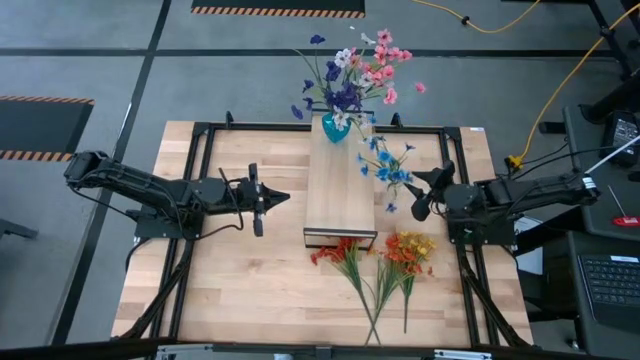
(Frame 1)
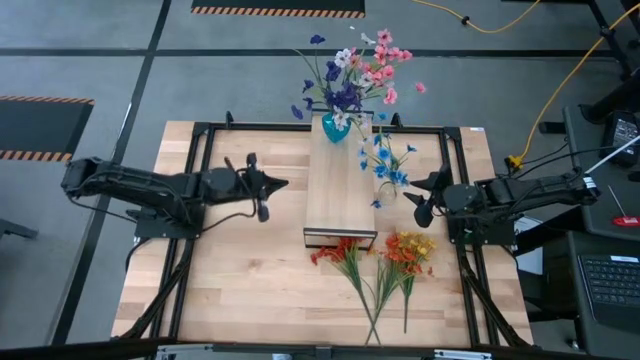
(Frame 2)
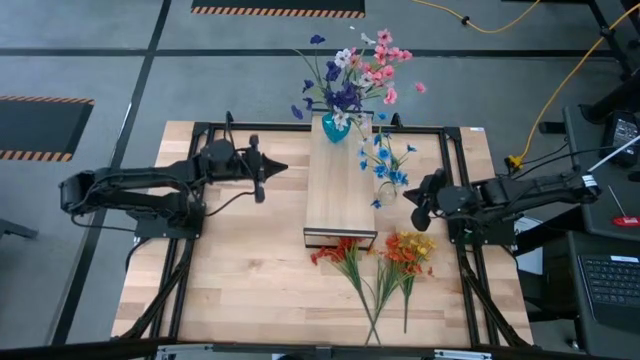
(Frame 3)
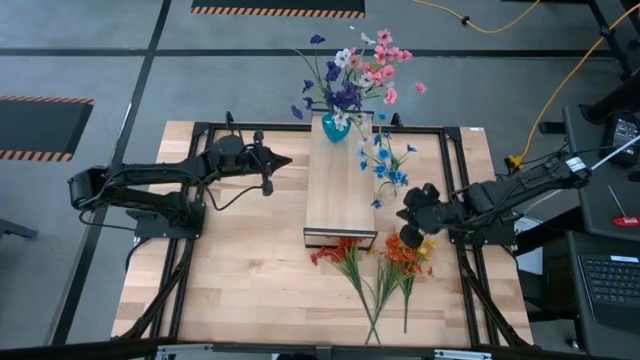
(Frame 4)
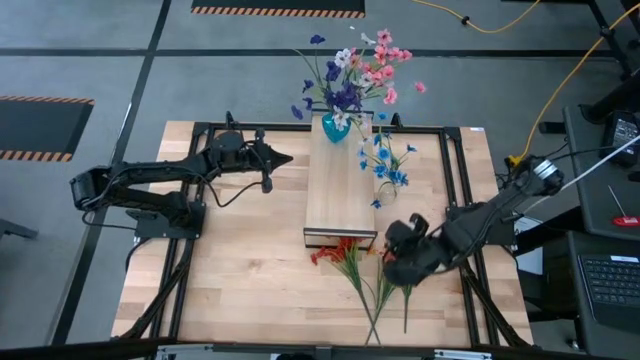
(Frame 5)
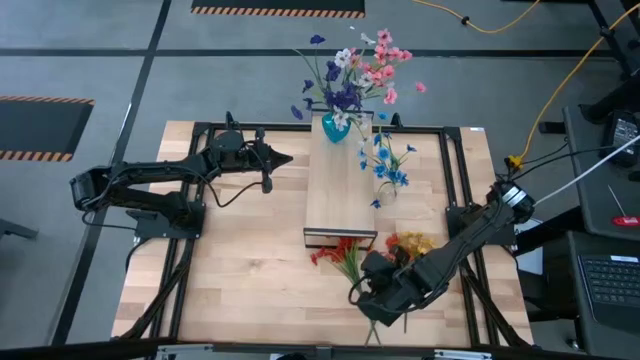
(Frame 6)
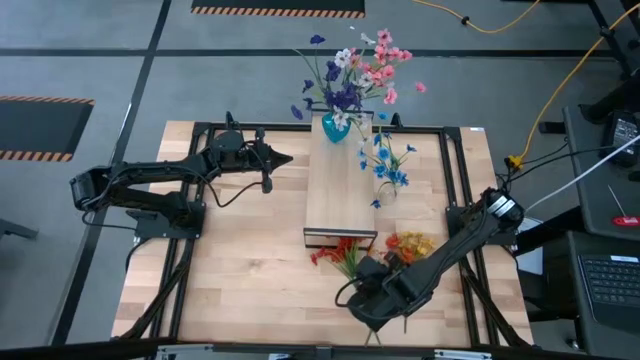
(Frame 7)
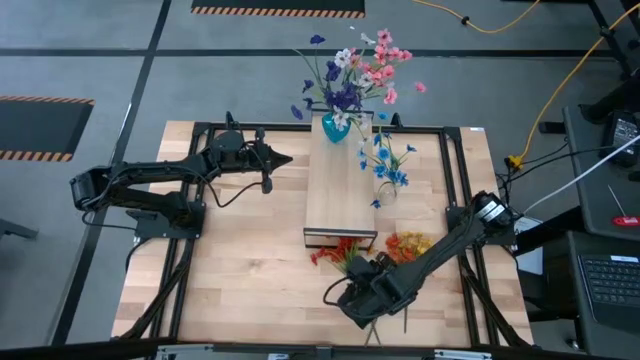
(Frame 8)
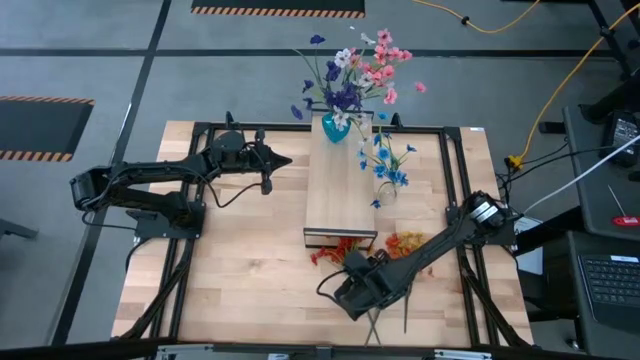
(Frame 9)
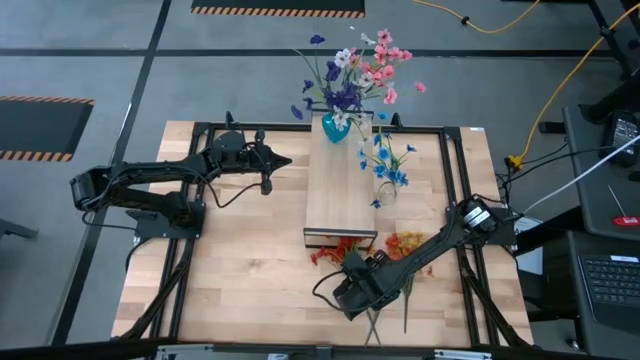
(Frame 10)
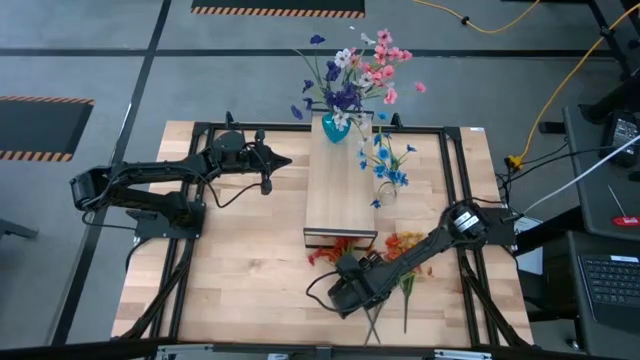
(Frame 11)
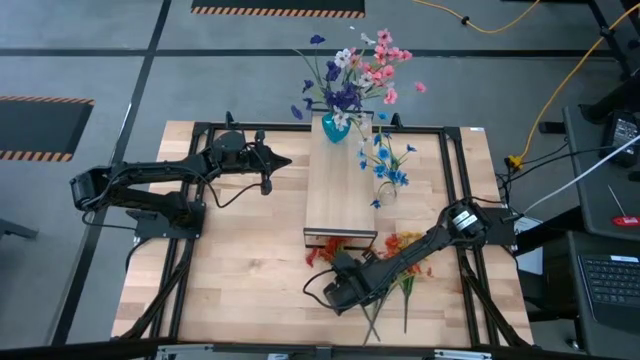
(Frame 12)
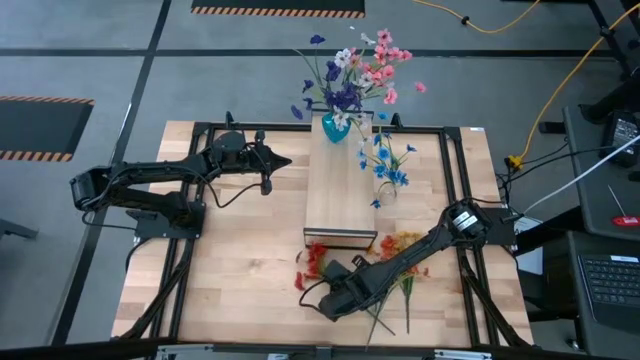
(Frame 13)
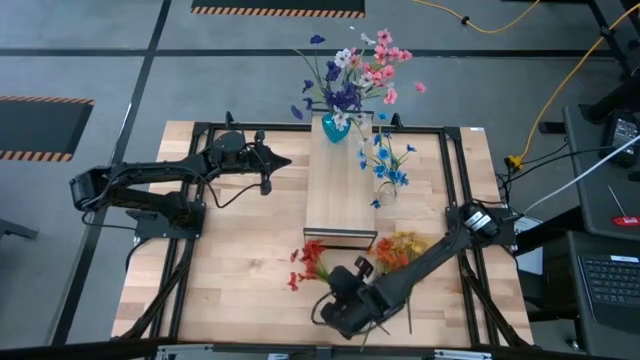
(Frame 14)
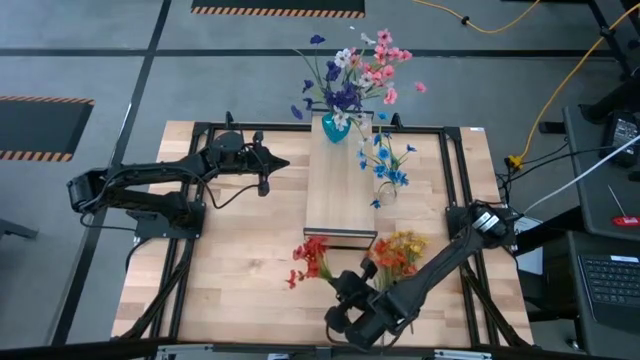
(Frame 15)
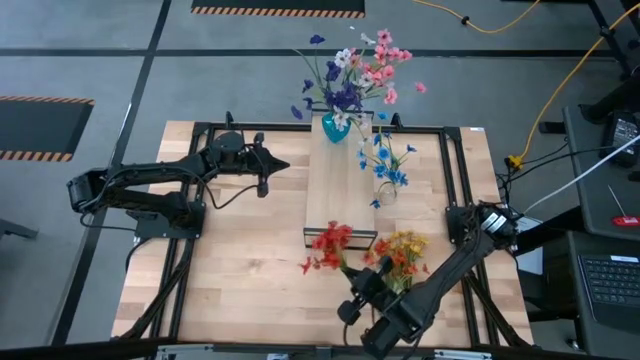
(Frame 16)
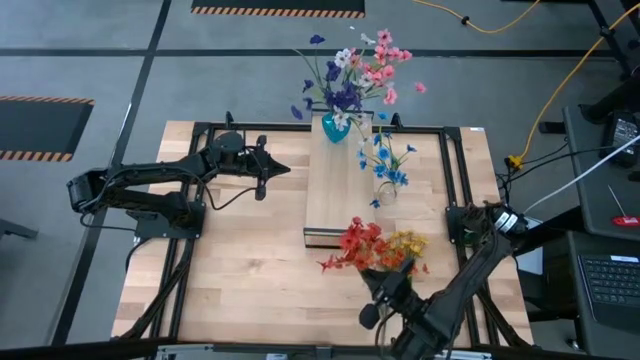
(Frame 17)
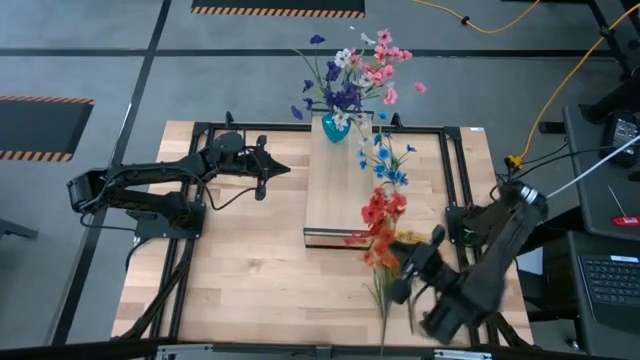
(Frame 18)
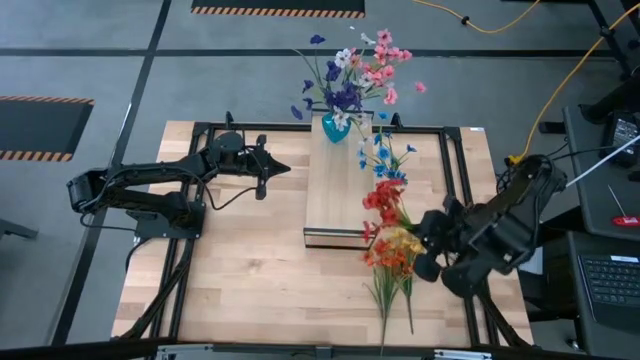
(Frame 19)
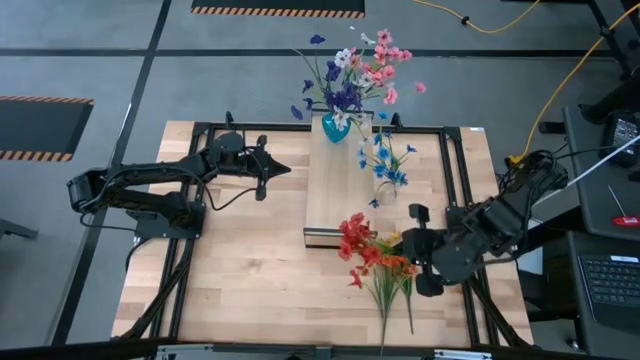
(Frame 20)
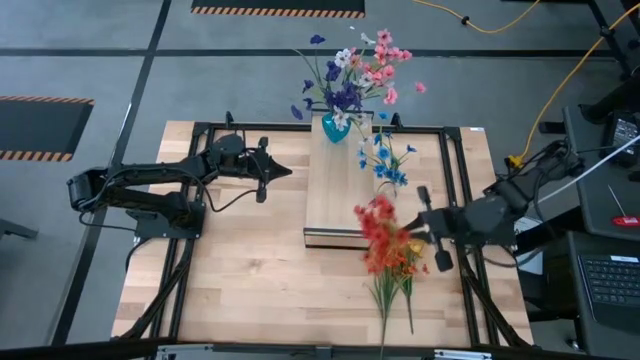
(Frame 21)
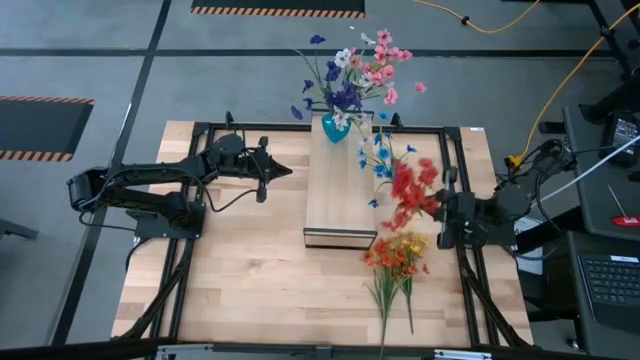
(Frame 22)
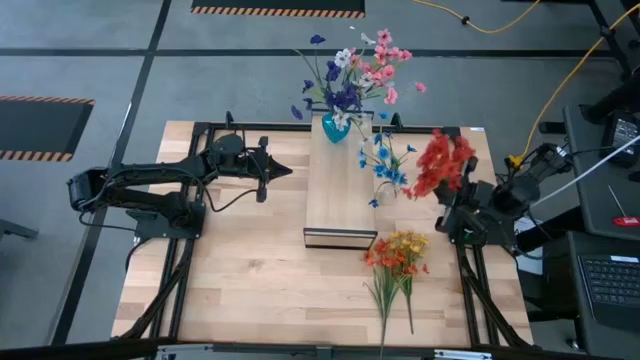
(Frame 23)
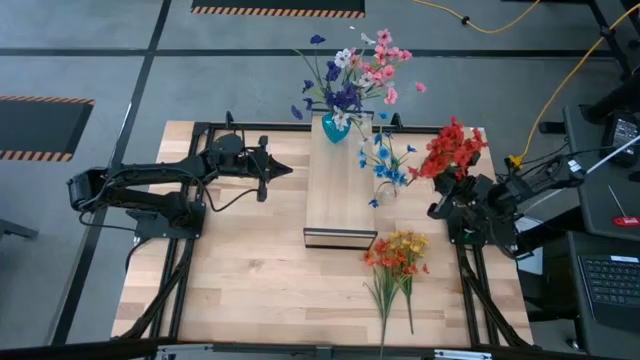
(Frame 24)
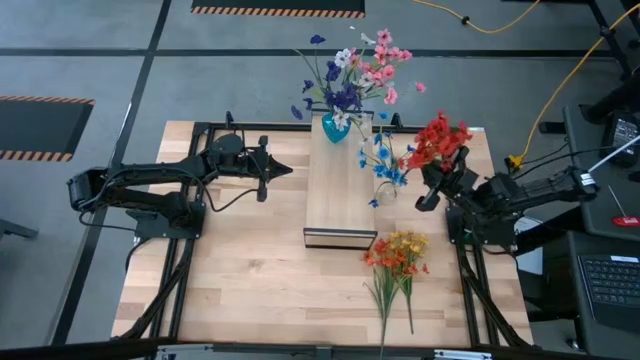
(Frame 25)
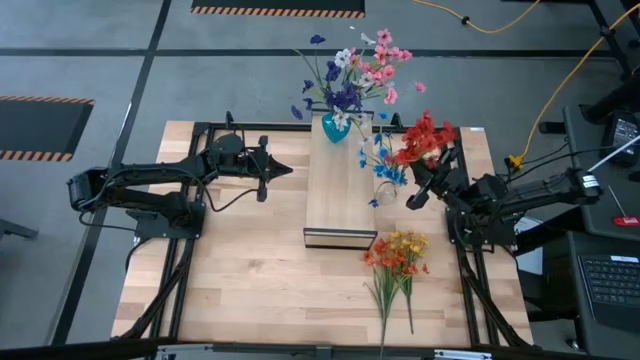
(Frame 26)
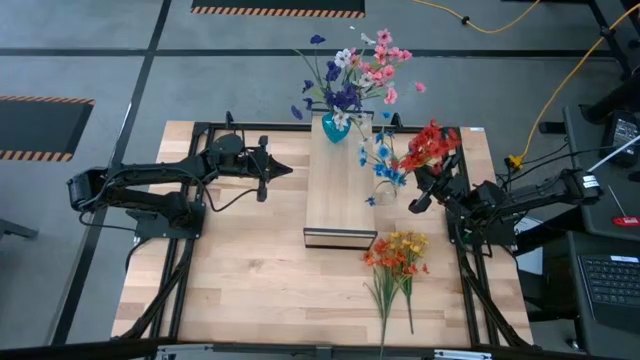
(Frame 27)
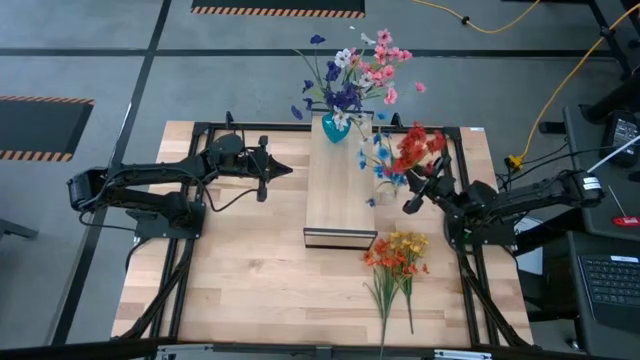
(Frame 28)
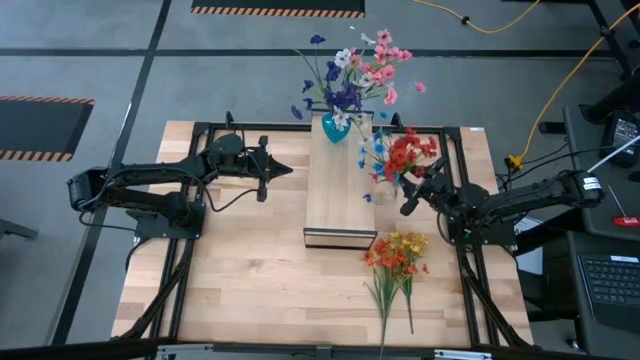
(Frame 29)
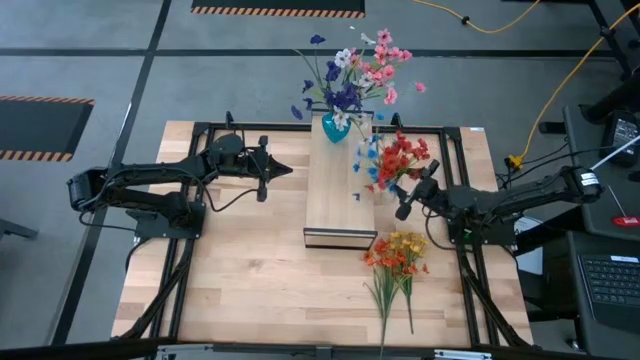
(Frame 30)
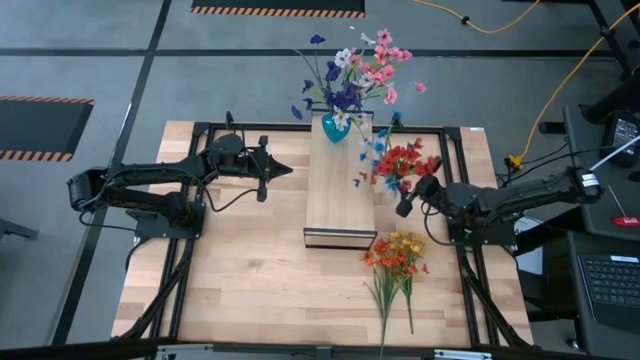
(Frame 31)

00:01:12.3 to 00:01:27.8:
Task: Pick and place flowers into a vace then onto a shelf
Put the red flowers into the transparent vase

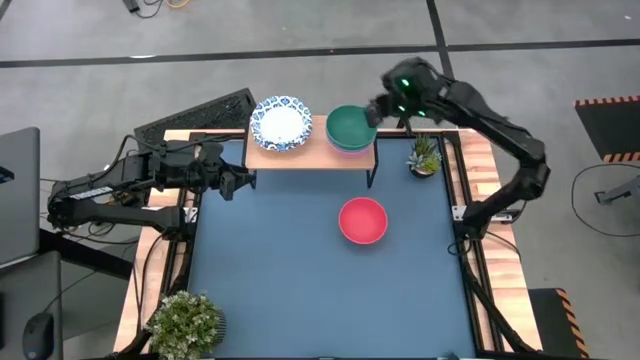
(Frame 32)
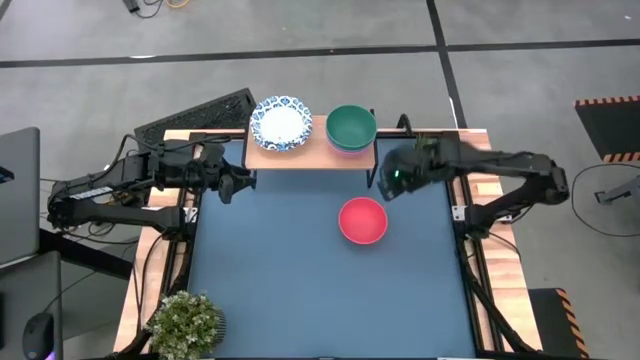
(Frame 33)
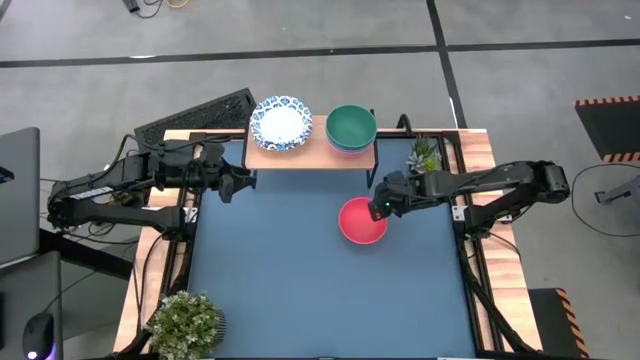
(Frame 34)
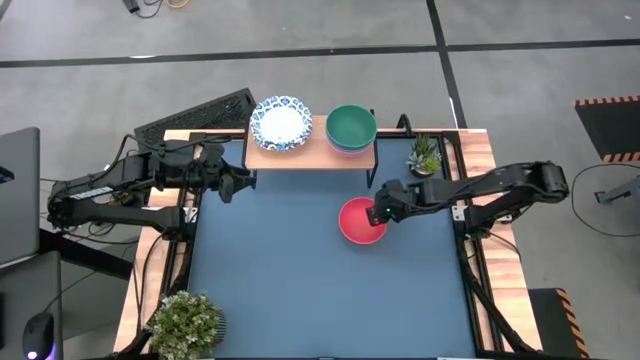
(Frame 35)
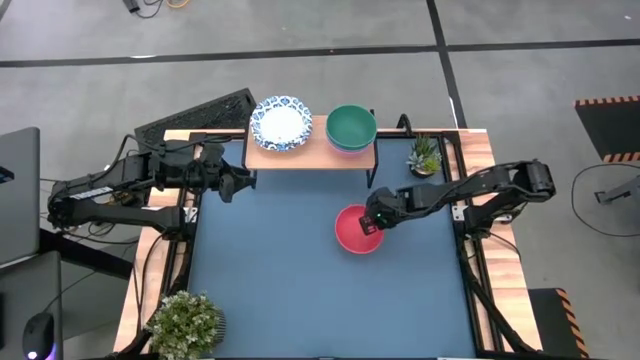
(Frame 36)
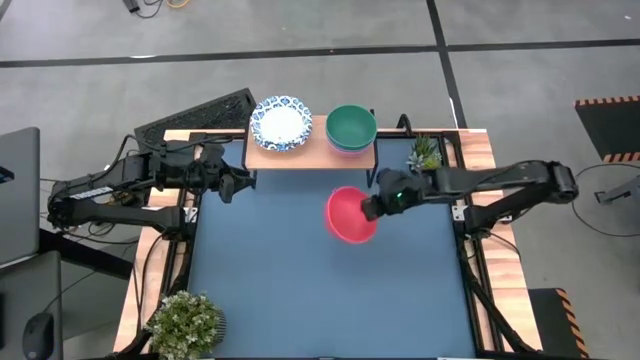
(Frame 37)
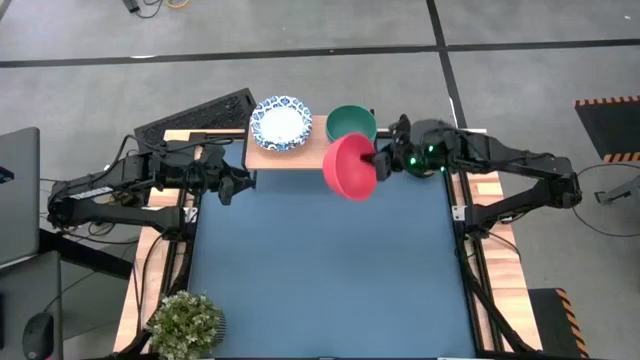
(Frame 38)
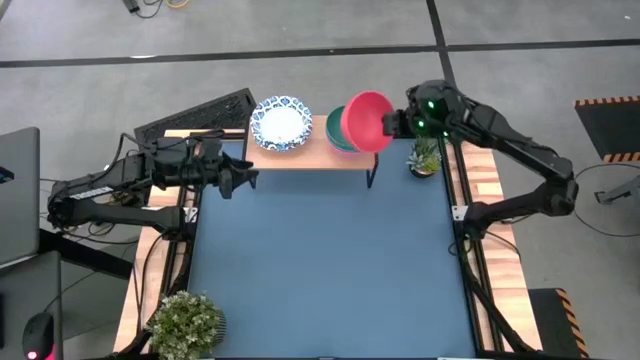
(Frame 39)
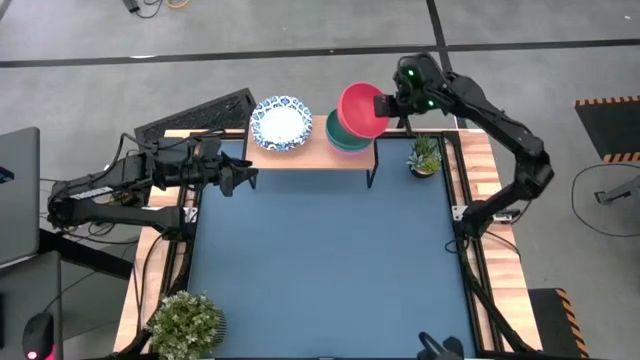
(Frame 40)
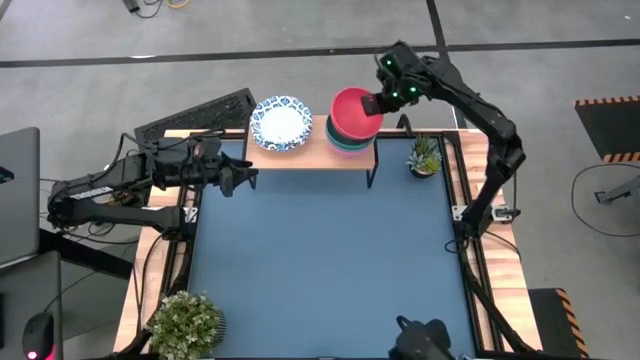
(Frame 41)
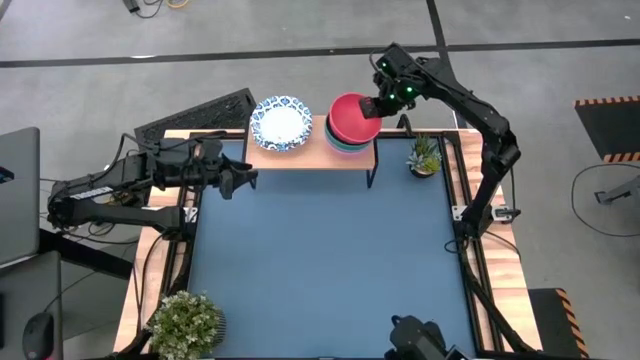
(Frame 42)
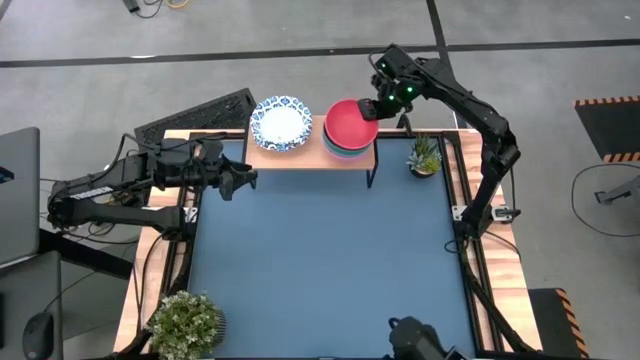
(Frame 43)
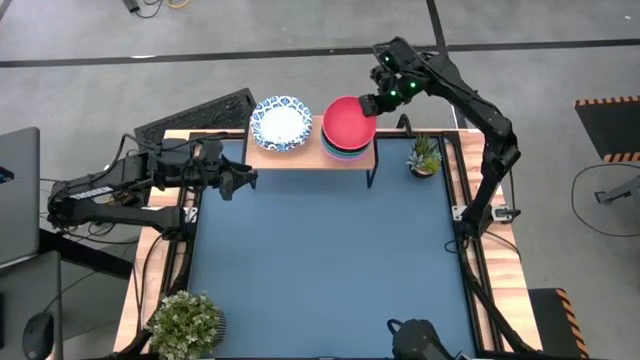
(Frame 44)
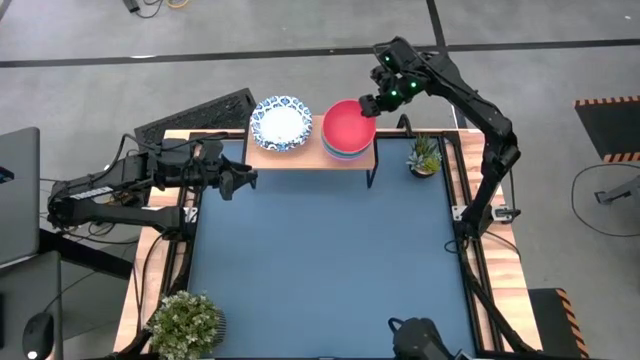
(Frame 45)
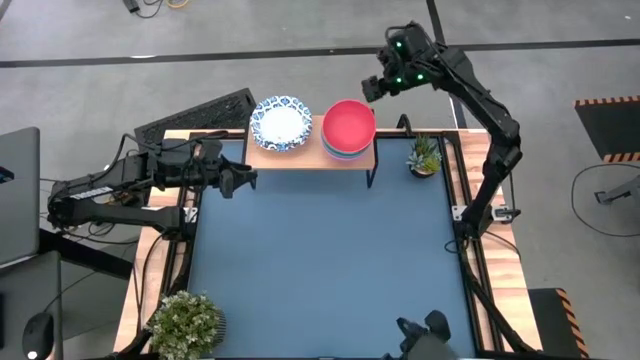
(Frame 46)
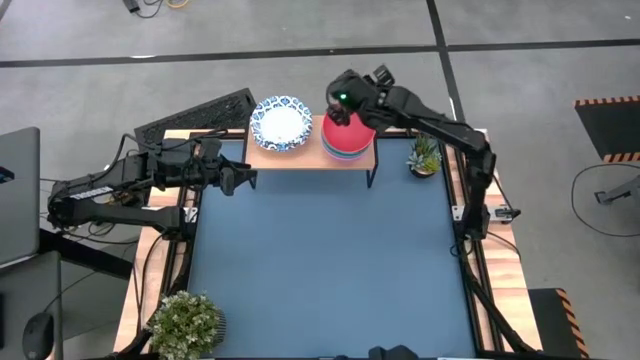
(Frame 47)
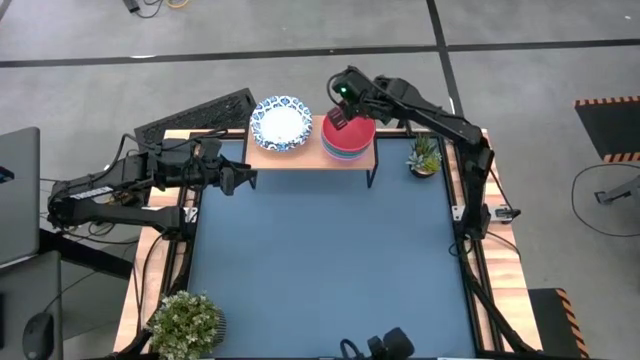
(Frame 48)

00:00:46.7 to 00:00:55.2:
Task: Place and stack bowls onto a shelf
Stack the dark pink bowl on the green bowl on the shelf
